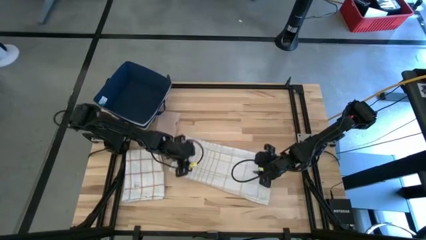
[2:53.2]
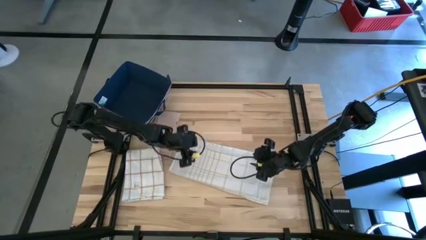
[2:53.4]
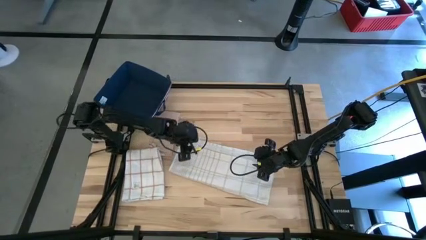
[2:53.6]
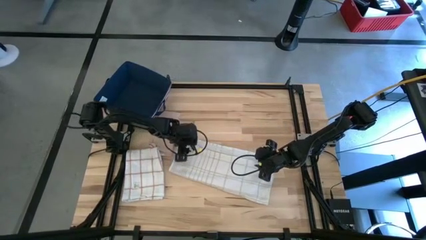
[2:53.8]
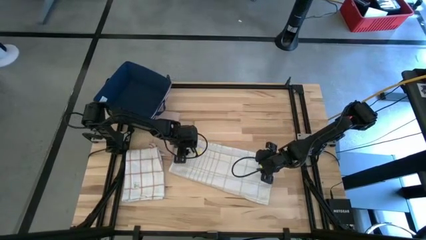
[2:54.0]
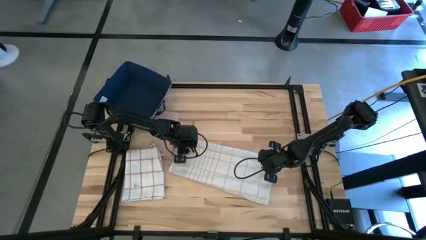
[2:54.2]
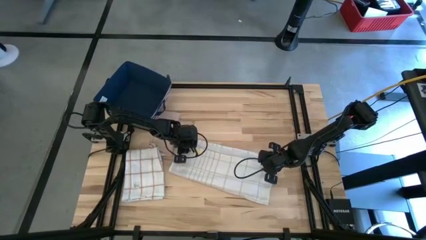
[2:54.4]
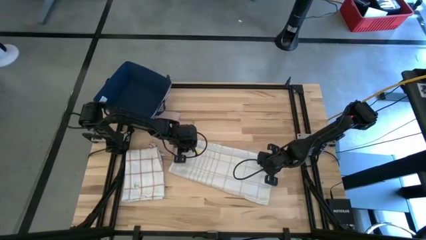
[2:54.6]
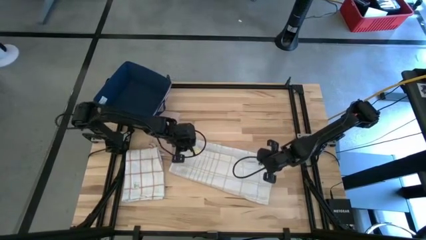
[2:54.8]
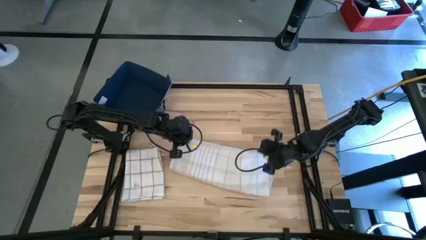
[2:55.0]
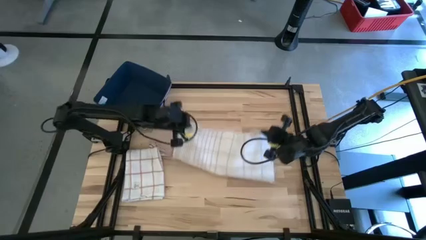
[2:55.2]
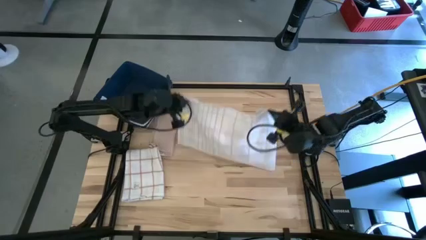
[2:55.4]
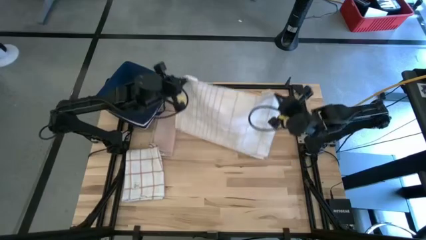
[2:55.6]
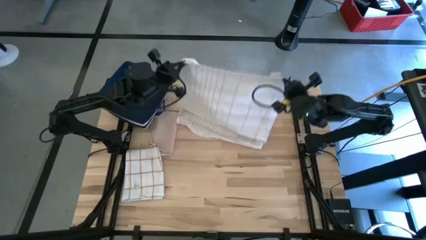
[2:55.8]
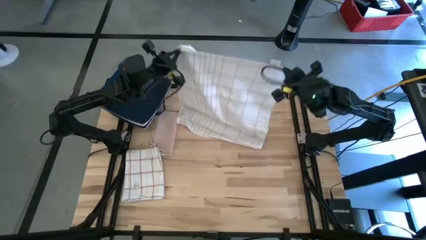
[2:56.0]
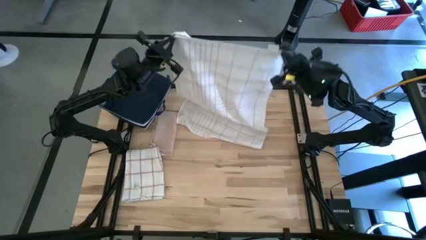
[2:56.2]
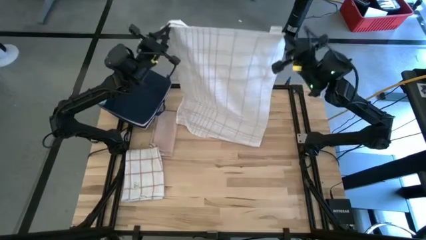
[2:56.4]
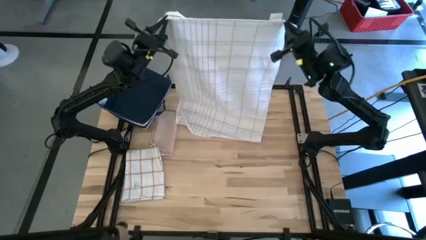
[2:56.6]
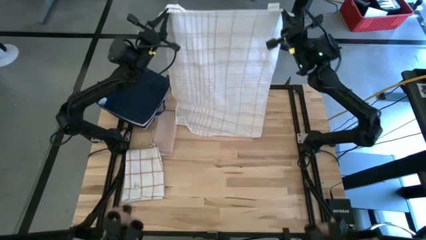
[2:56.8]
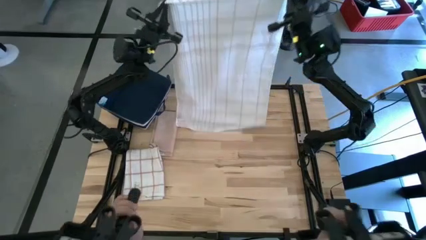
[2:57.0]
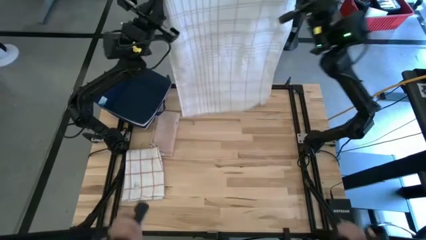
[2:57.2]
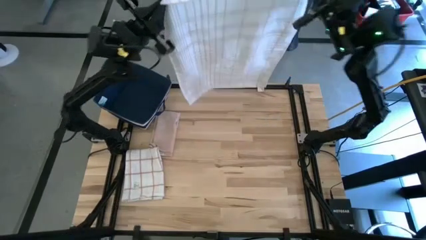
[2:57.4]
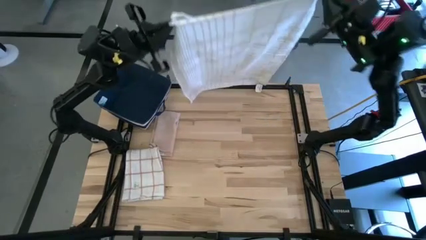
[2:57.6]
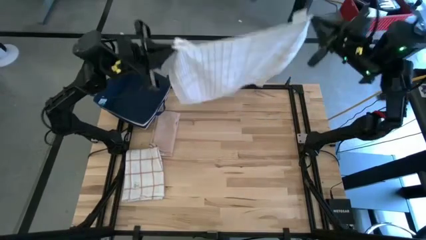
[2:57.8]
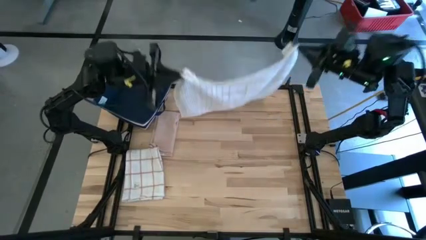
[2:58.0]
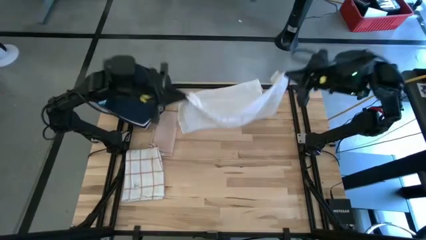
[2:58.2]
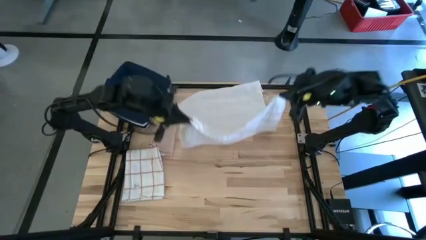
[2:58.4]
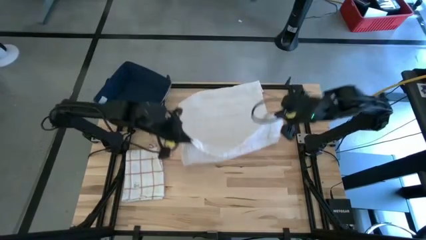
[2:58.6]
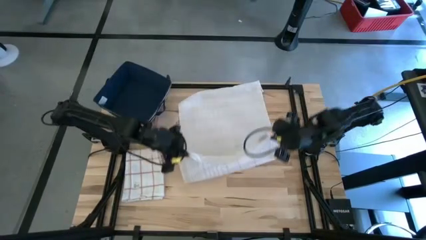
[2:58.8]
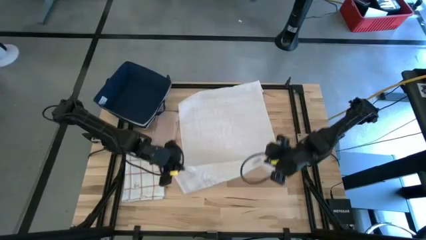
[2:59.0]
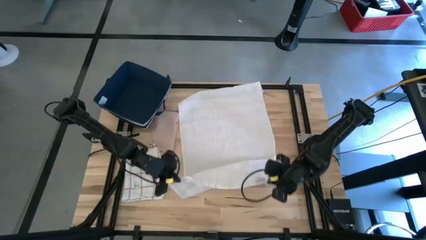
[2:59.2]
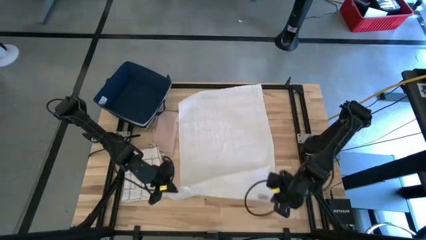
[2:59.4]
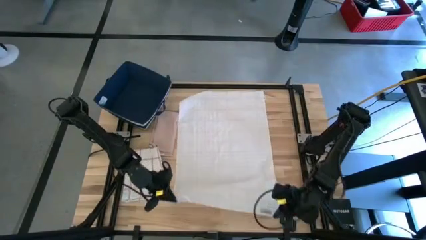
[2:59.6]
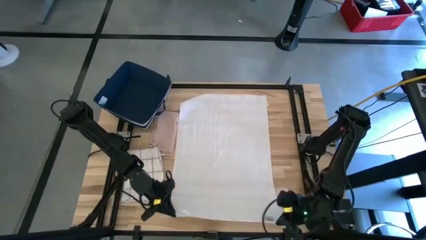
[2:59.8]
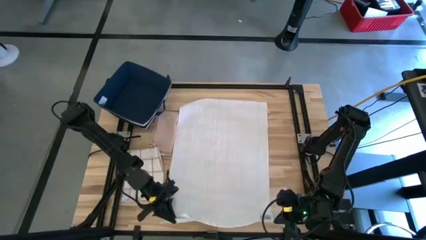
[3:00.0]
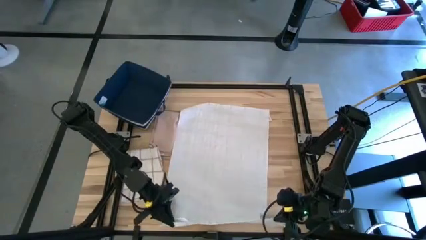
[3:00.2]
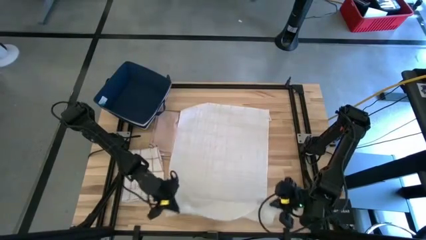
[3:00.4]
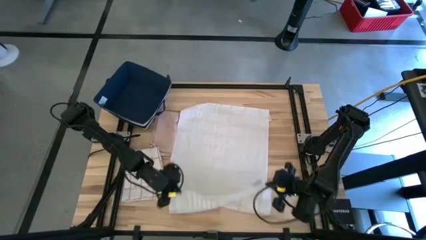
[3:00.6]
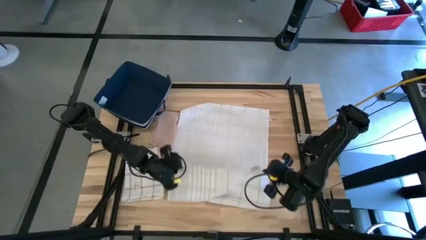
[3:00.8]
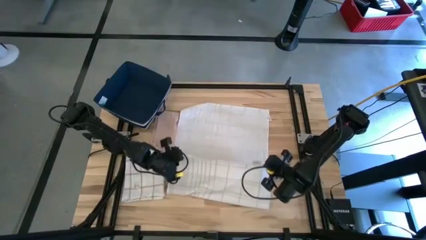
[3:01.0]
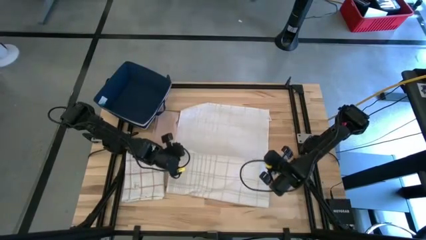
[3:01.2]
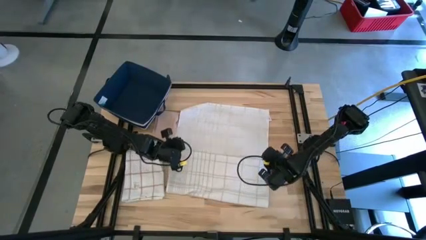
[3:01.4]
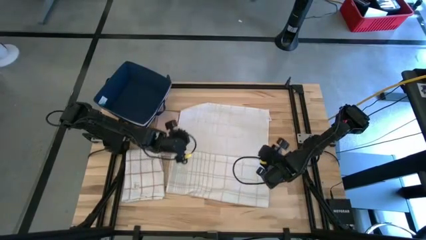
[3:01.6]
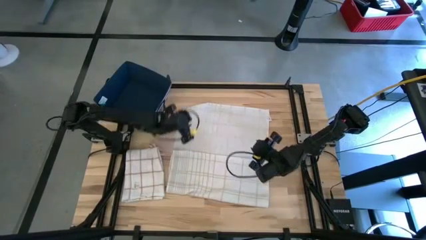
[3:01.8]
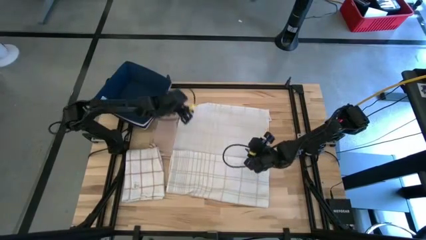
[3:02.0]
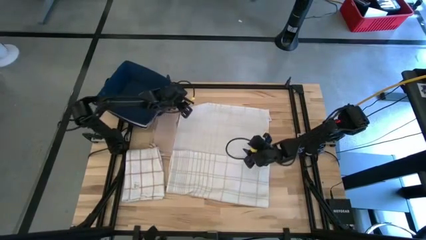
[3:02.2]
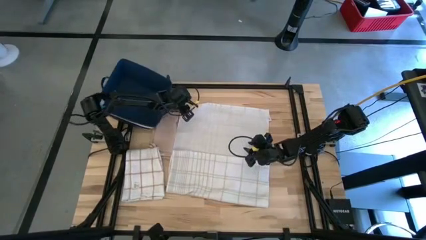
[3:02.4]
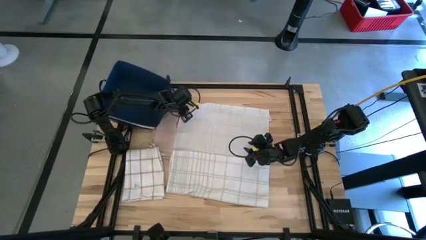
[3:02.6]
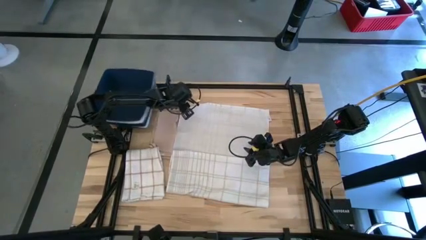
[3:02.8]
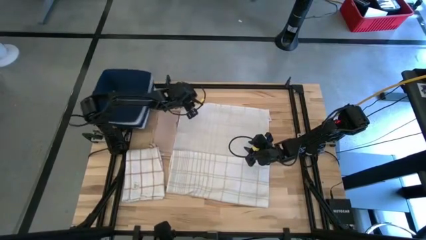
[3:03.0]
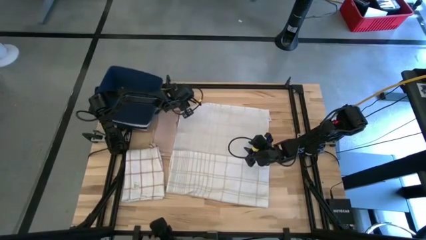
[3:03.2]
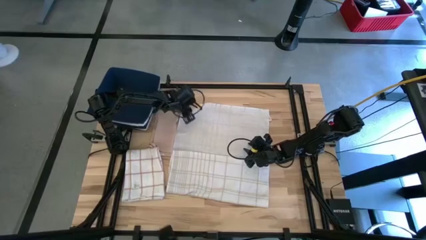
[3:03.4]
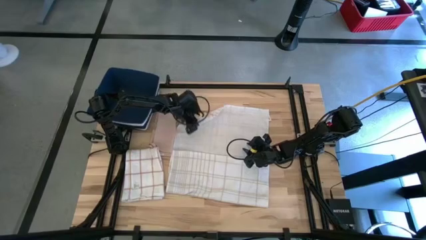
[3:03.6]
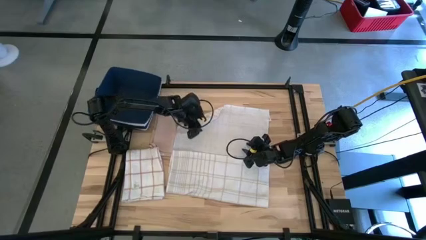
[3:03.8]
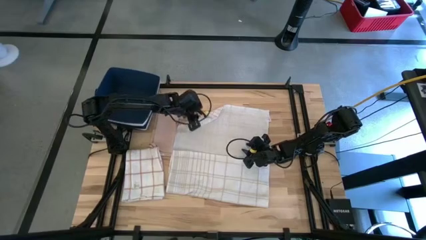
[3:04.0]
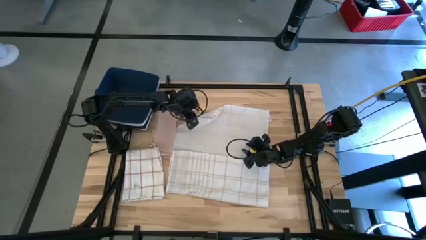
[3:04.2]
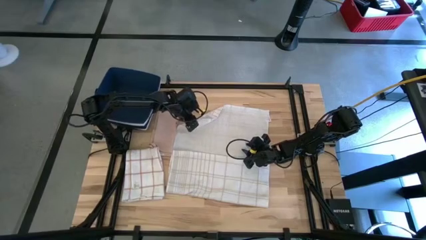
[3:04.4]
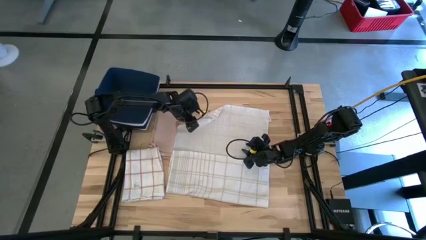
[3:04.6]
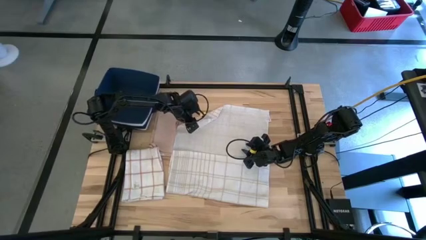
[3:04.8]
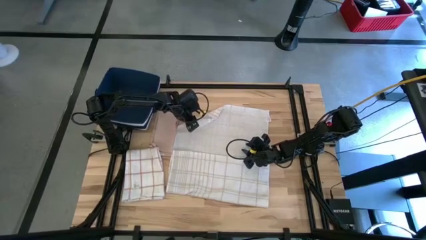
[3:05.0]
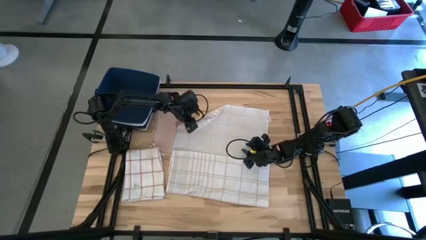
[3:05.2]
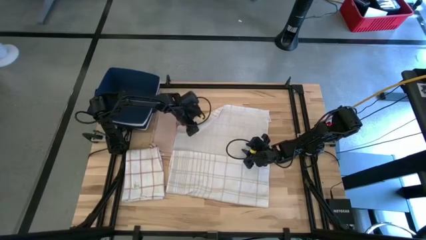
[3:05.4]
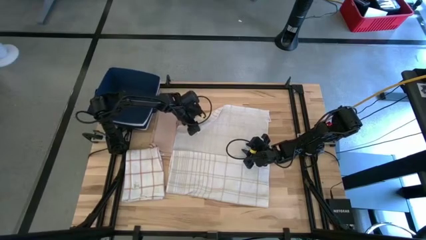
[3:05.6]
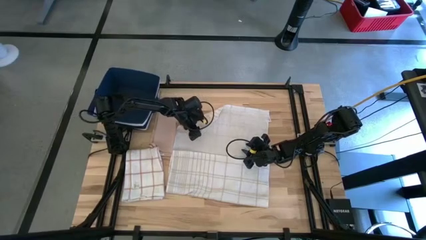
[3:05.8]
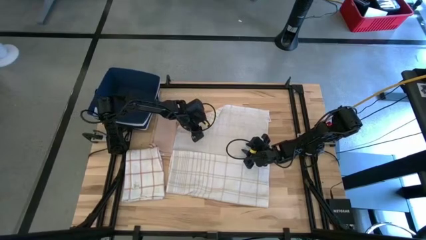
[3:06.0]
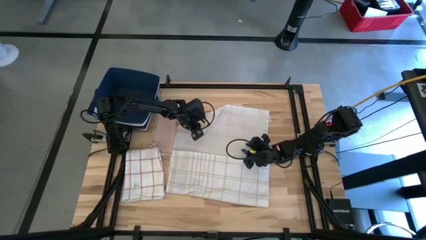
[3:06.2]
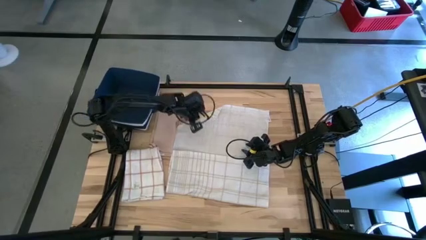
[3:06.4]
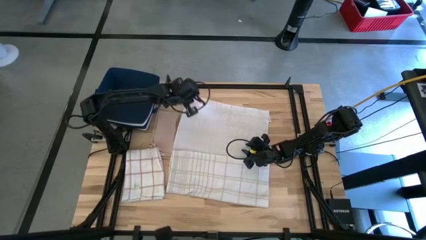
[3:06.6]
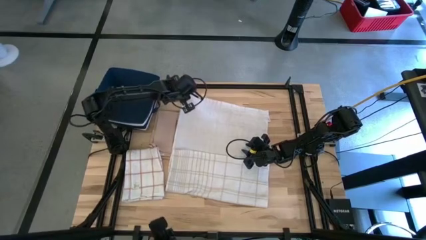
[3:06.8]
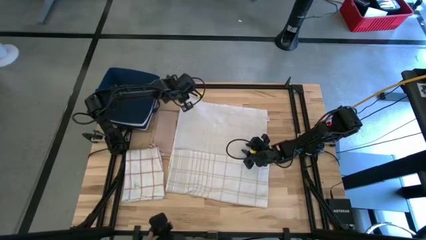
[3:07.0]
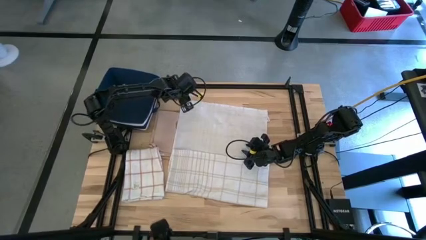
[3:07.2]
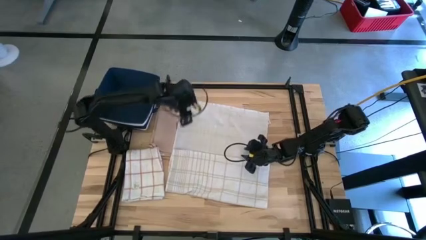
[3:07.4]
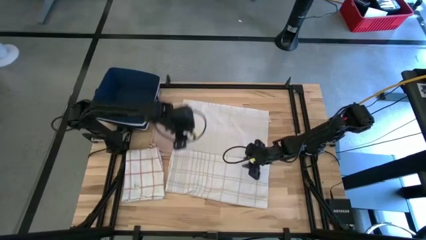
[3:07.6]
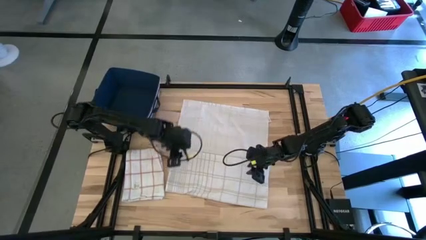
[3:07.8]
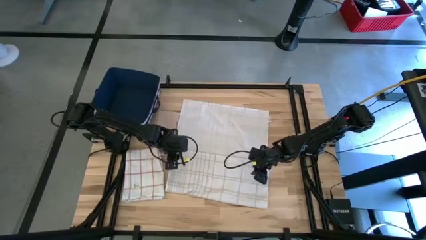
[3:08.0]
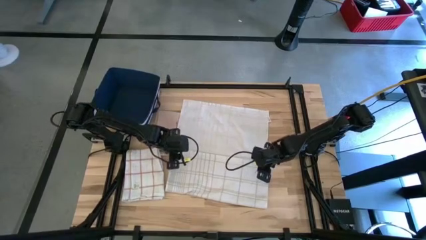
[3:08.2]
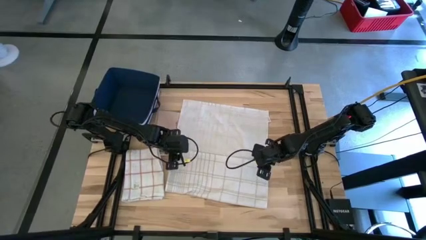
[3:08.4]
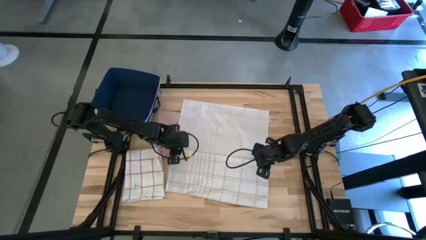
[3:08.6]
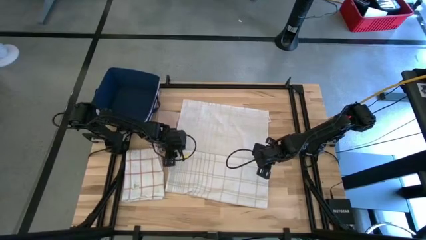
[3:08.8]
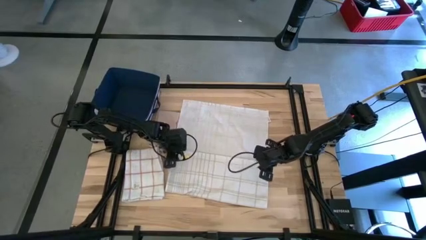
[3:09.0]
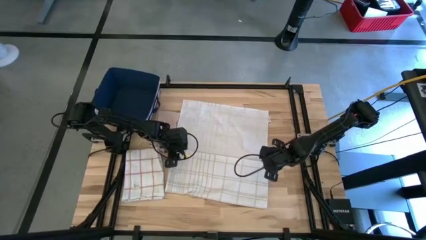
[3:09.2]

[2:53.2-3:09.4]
Task: Fold towel
Fold the right checkered white towel
